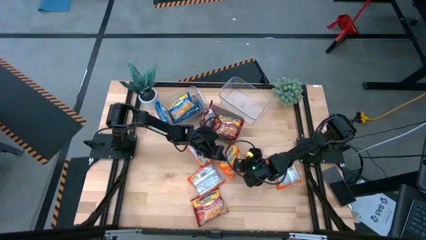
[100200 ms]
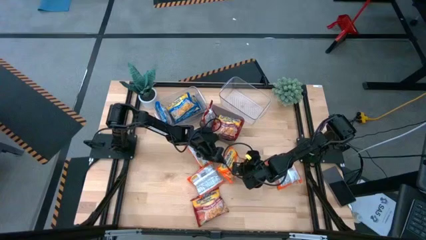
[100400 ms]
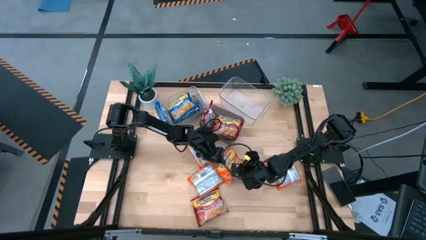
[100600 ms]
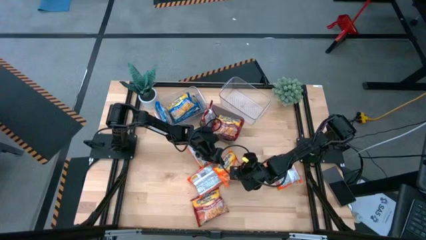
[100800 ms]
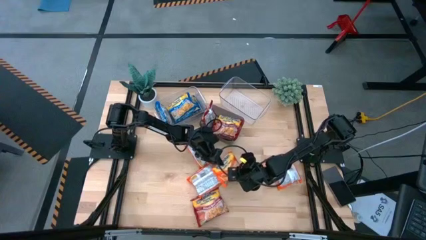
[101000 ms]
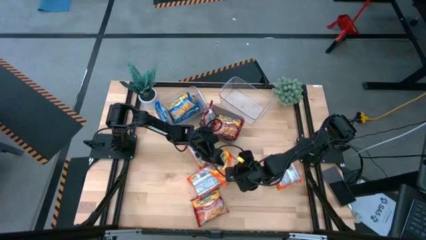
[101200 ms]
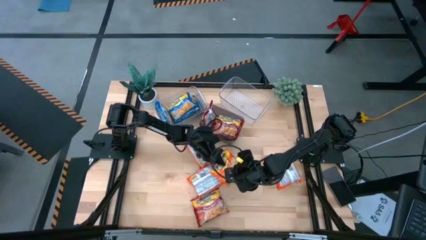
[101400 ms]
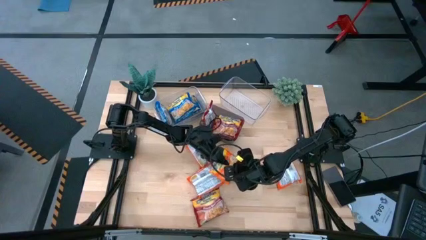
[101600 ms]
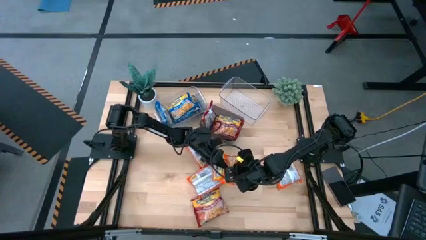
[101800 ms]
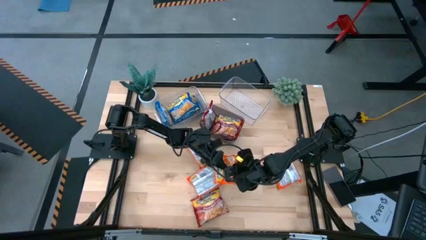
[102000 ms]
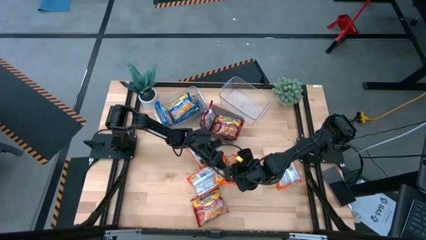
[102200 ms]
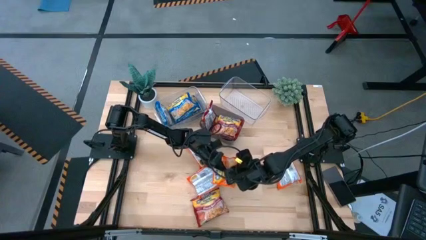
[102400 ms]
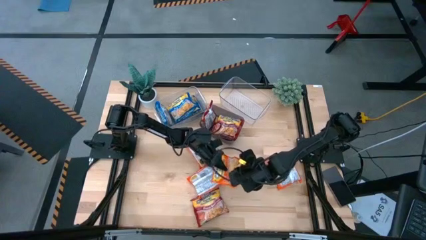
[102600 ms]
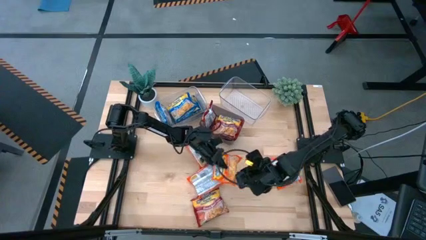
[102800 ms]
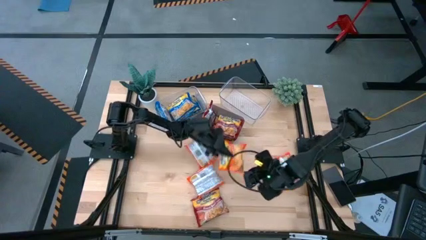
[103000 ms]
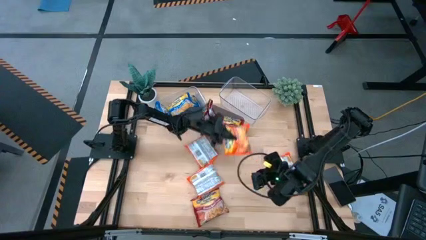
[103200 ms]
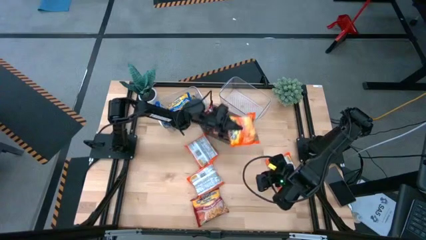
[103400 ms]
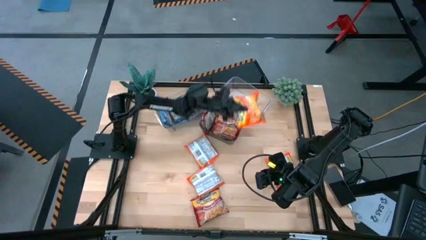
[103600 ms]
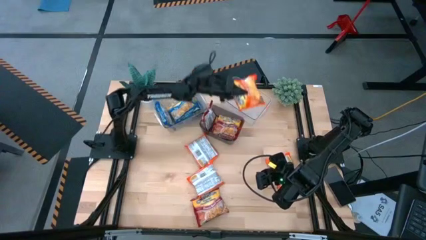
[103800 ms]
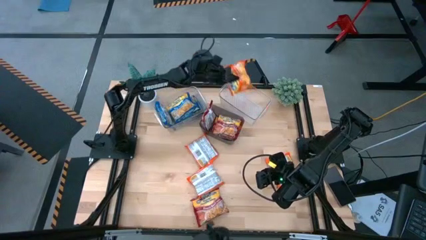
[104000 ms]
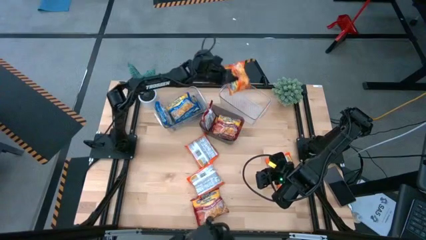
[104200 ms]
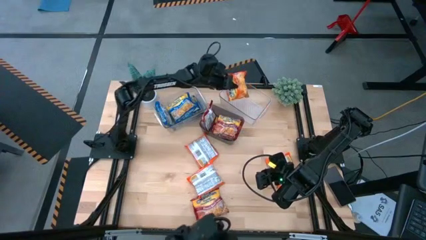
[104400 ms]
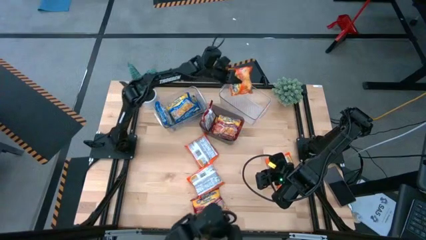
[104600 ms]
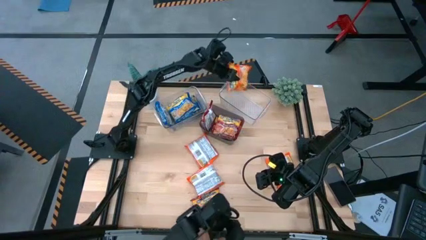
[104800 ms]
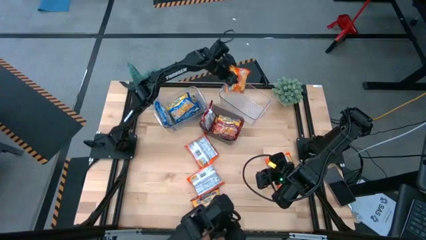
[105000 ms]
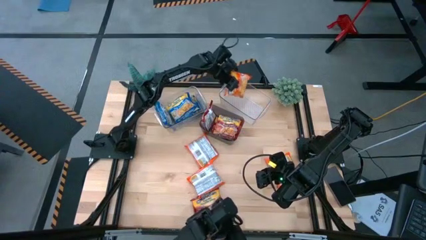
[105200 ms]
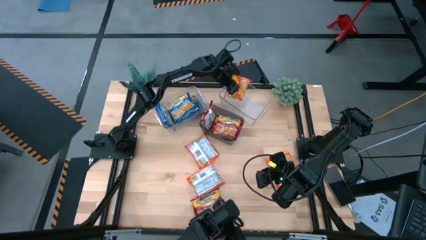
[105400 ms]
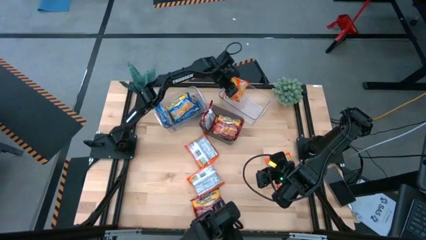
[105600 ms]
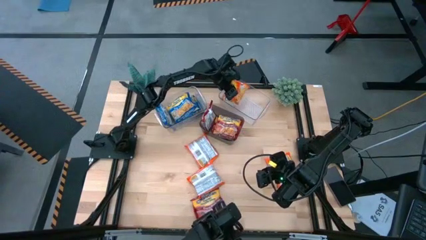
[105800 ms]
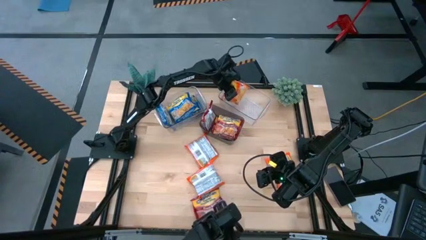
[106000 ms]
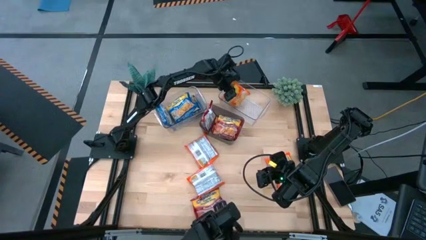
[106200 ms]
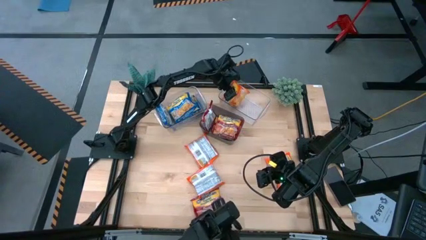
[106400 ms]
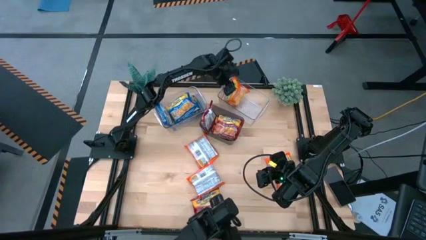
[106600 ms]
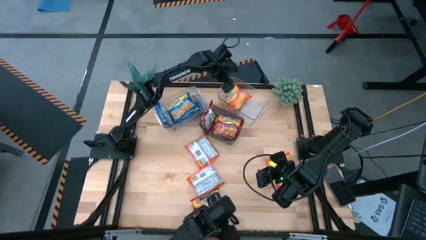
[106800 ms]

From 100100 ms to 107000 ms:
Task: Sort Maruchan noodles
Put the orange noodle pack into the right transparent bin

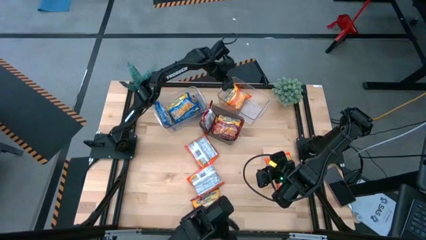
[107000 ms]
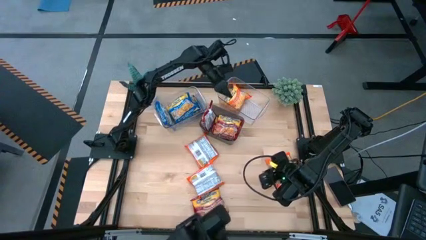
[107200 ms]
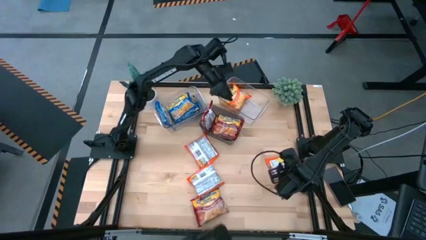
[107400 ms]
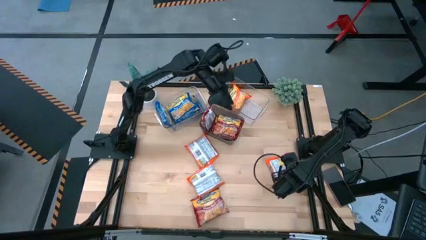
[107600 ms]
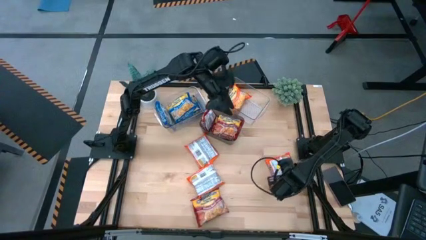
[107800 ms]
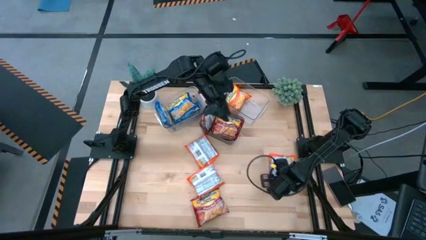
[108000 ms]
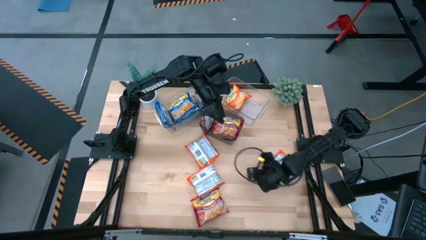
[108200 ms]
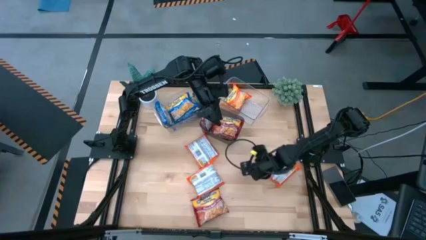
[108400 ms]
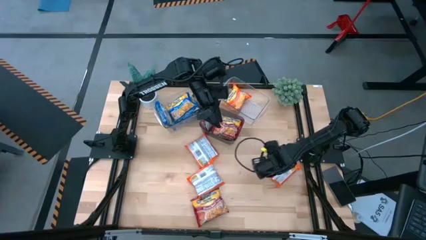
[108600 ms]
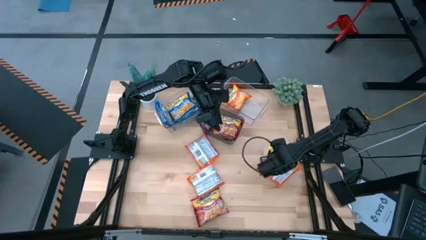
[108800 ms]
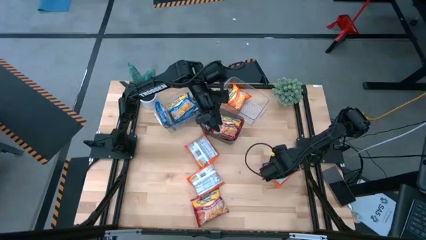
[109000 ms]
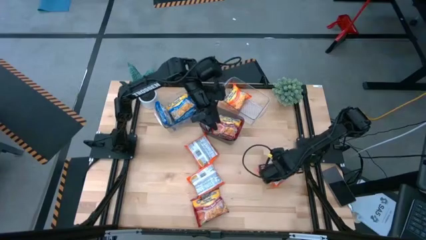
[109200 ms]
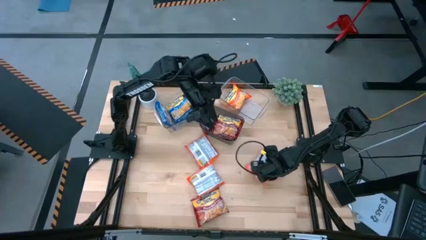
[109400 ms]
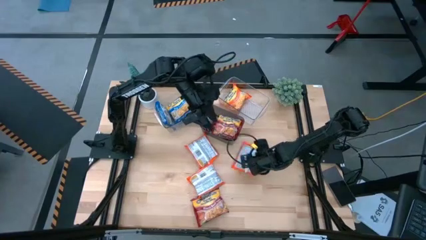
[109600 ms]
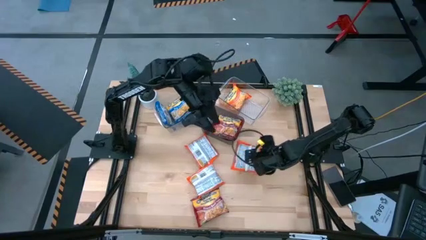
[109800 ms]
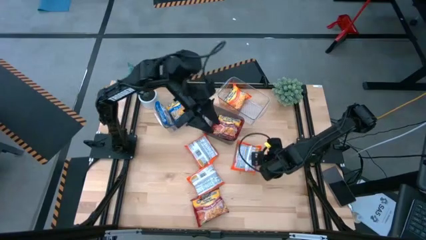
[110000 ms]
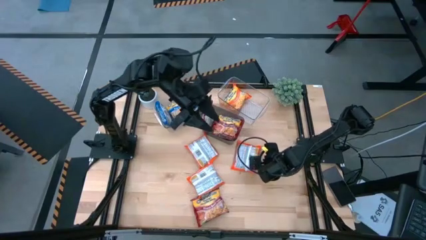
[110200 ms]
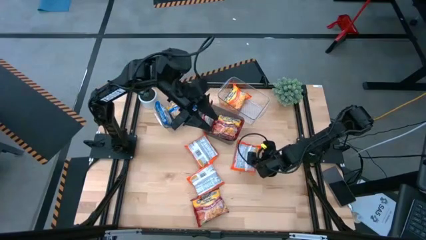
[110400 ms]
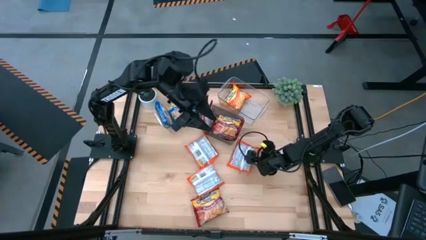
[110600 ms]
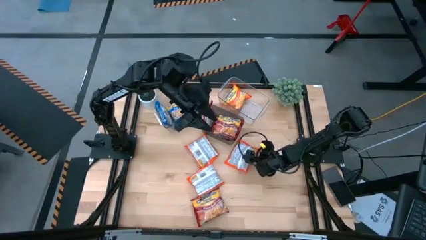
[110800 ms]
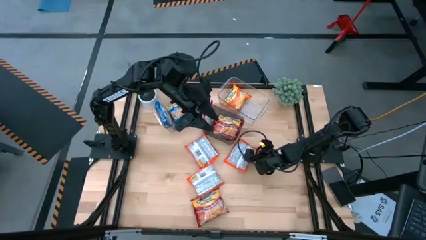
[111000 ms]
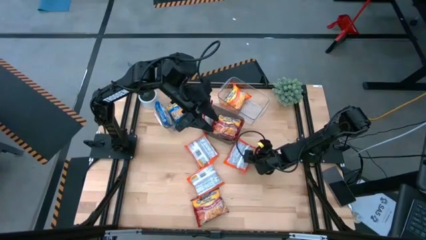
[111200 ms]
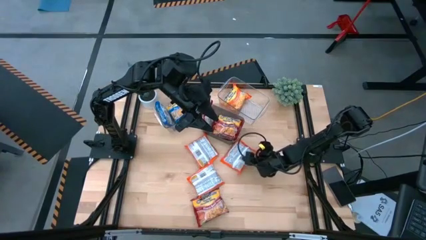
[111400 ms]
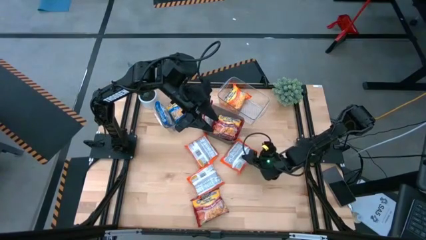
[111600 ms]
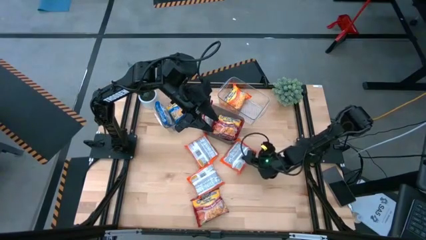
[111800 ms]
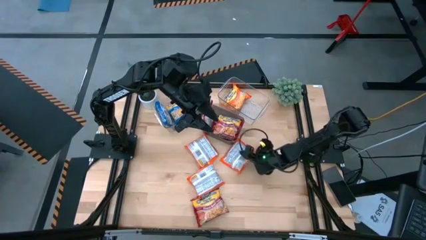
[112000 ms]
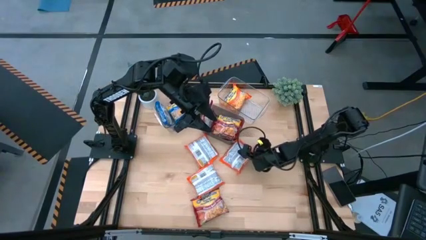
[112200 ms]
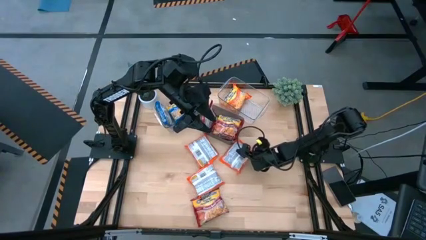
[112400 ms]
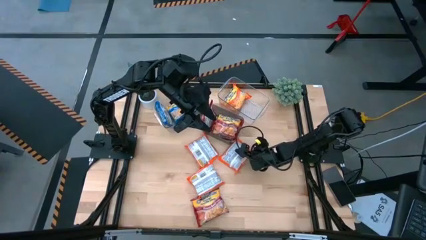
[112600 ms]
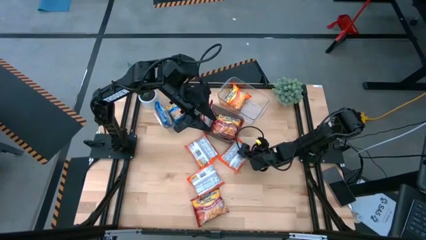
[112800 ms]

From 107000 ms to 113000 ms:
Put the orange noodle pack into the right transparent bin

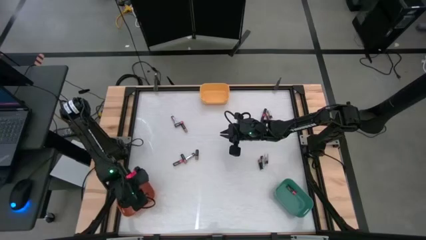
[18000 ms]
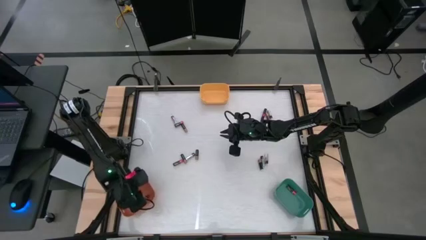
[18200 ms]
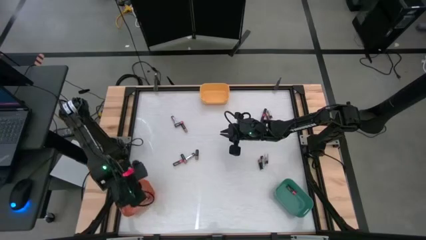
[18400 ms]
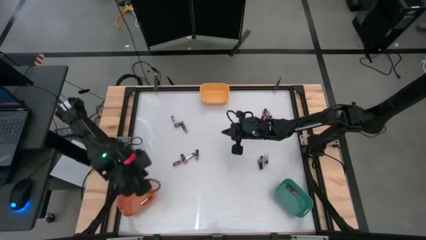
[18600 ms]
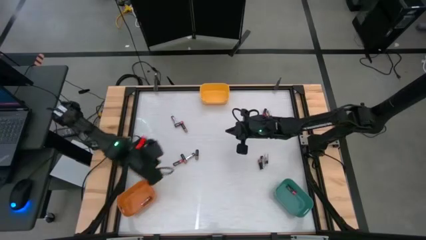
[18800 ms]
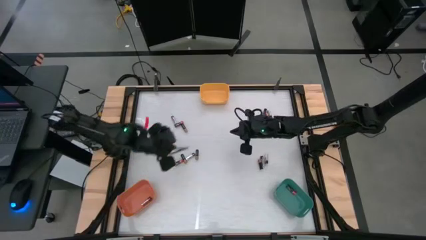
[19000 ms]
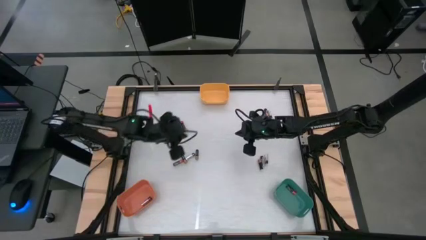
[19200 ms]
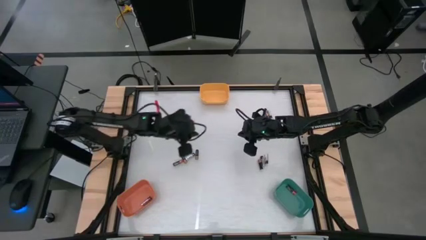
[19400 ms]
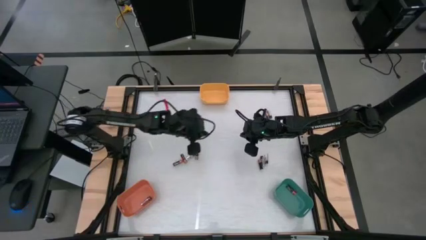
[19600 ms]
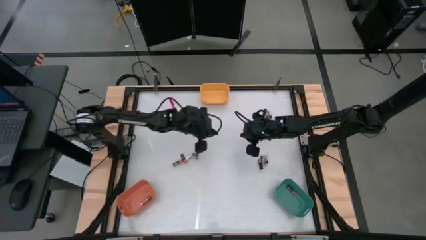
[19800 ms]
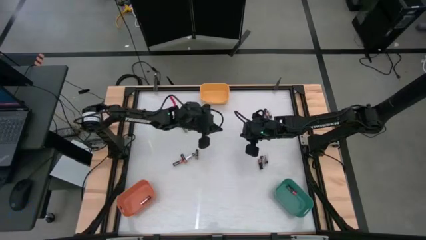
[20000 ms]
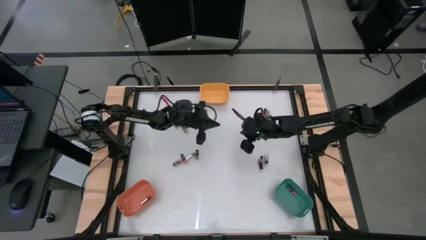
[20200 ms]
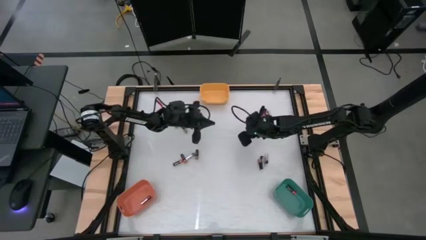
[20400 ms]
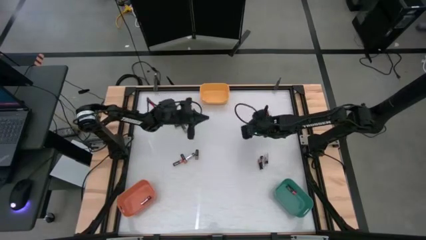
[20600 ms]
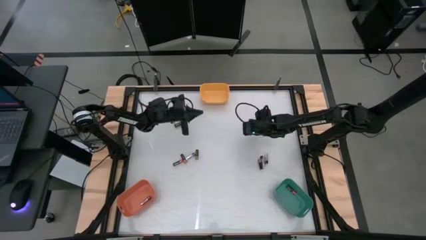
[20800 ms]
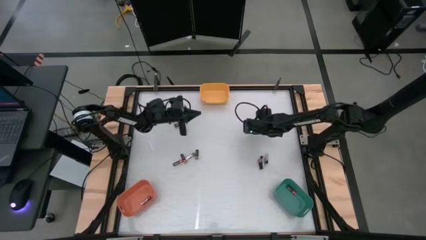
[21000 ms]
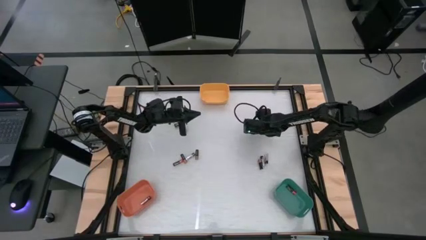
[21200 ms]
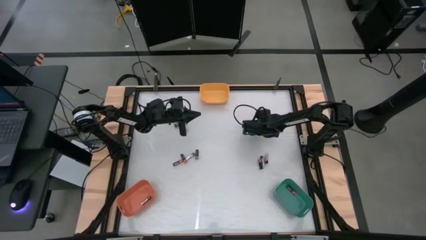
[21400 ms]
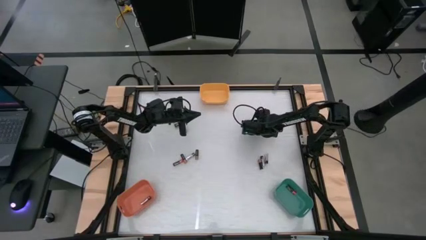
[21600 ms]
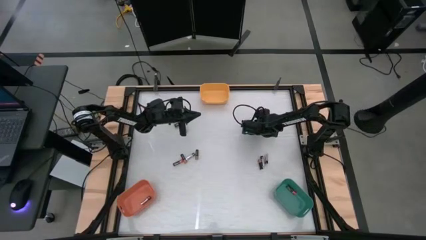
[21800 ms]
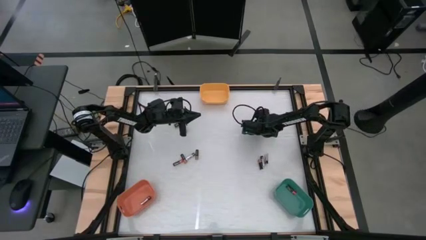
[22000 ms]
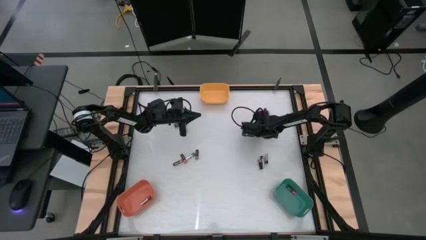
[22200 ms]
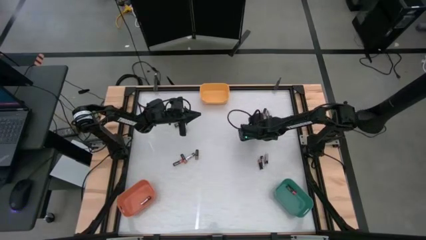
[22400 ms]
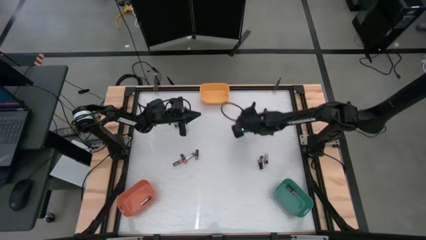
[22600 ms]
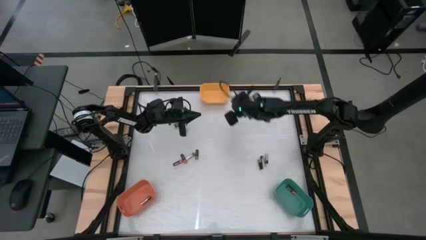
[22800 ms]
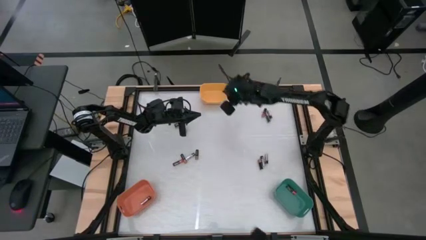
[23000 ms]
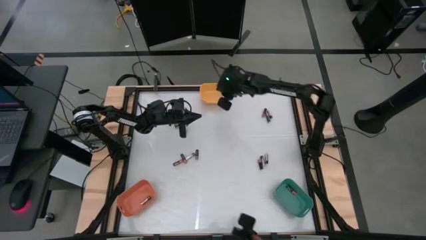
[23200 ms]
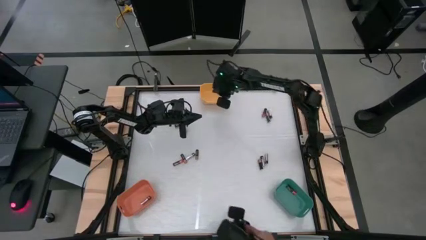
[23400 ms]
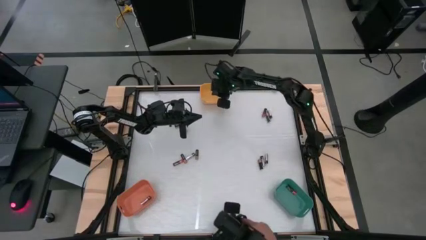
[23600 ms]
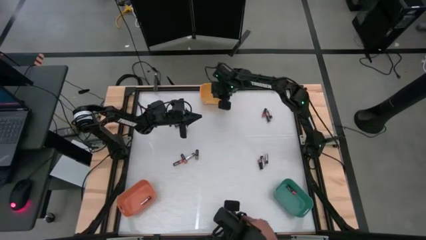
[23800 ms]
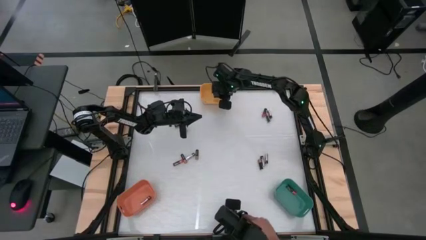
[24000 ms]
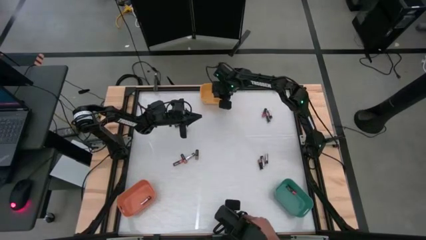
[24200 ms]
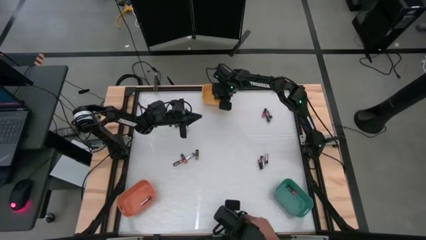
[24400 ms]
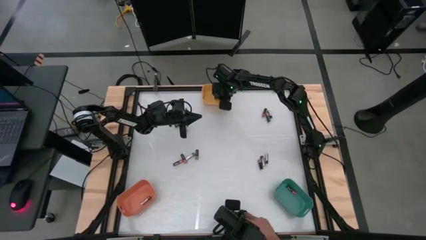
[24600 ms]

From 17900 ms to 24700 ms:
Task: Sort batteries
Put the black-brown battery into the yellow bin
